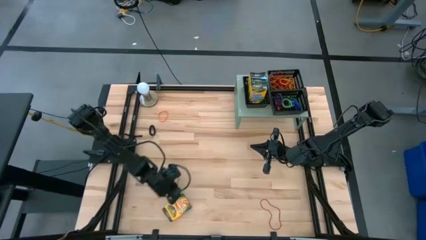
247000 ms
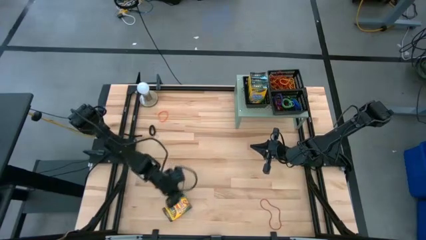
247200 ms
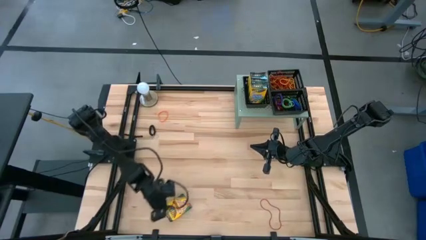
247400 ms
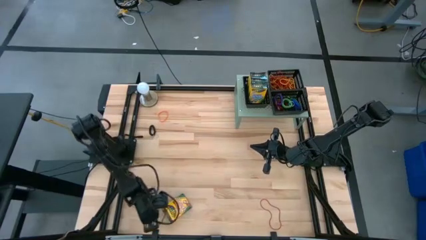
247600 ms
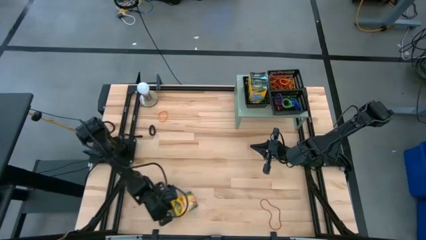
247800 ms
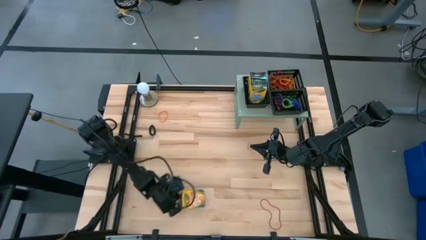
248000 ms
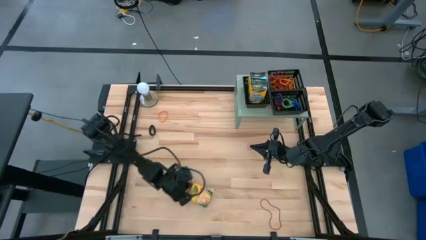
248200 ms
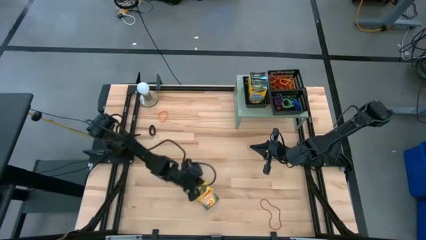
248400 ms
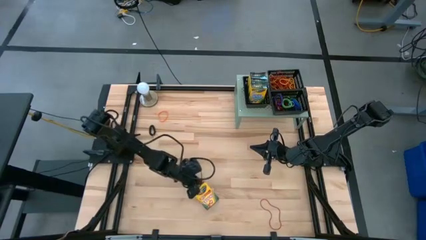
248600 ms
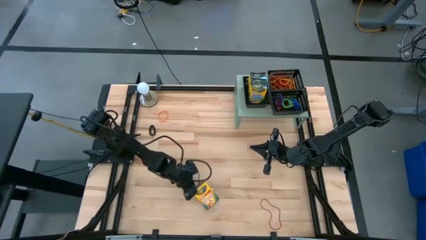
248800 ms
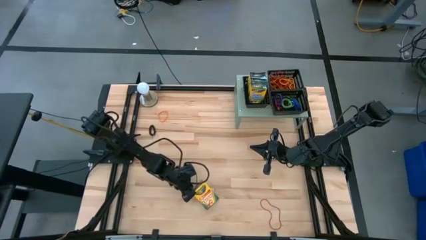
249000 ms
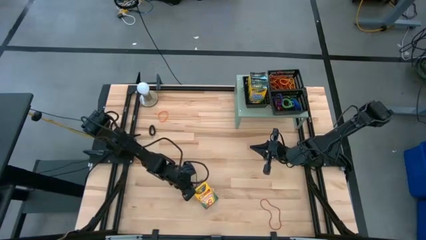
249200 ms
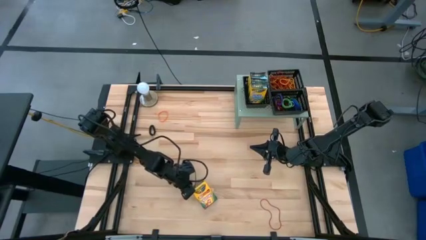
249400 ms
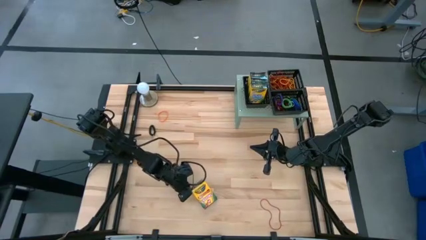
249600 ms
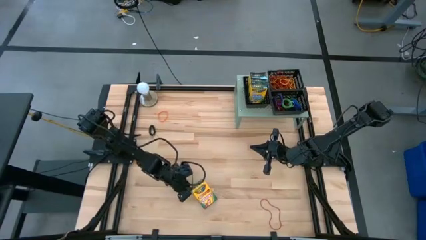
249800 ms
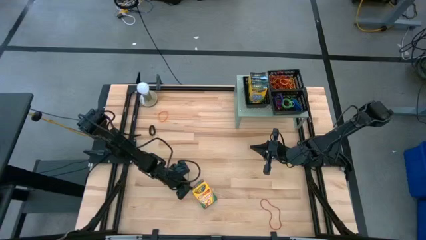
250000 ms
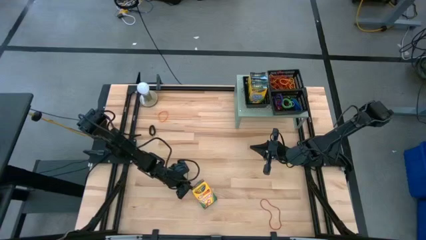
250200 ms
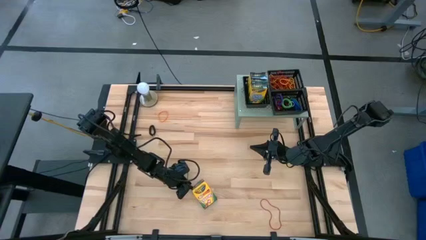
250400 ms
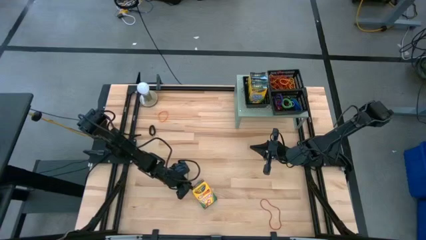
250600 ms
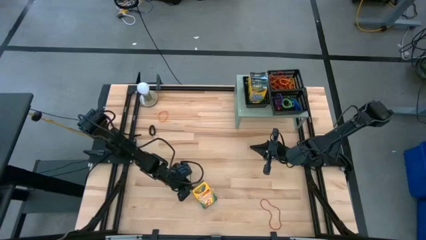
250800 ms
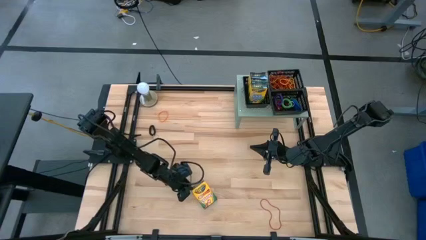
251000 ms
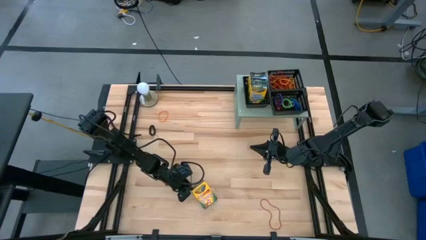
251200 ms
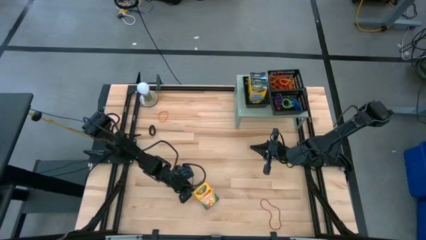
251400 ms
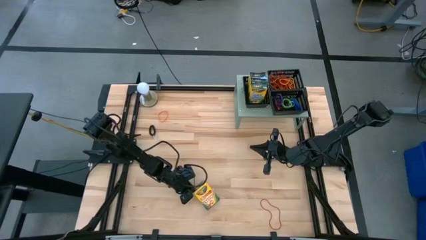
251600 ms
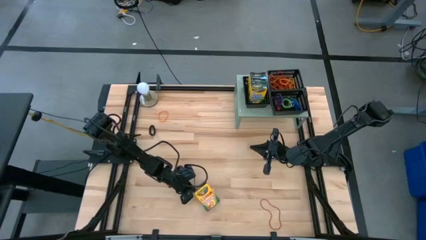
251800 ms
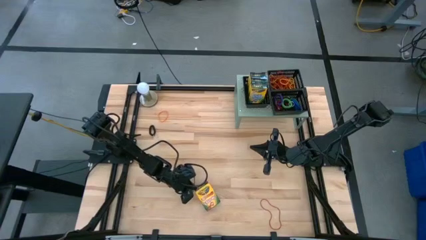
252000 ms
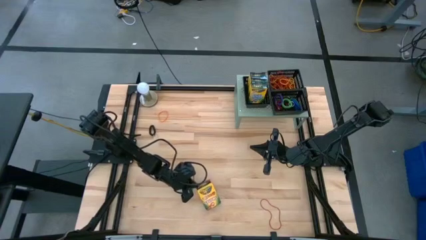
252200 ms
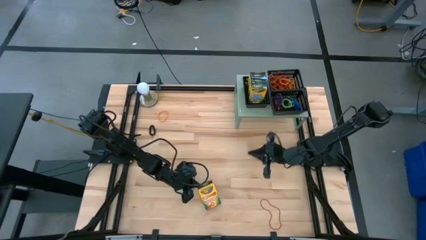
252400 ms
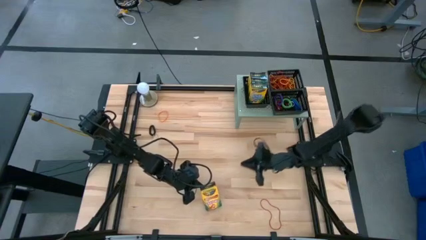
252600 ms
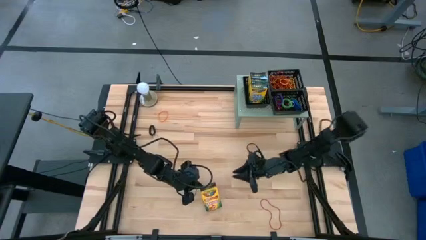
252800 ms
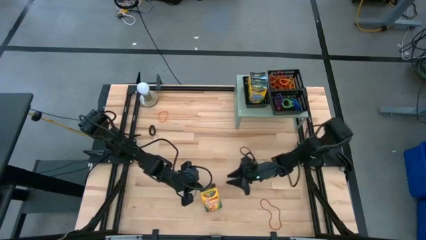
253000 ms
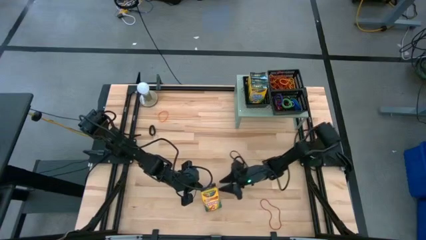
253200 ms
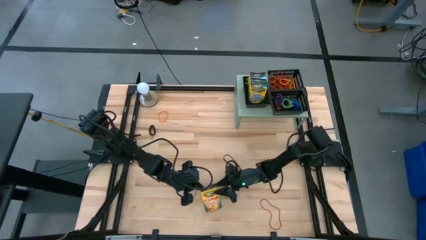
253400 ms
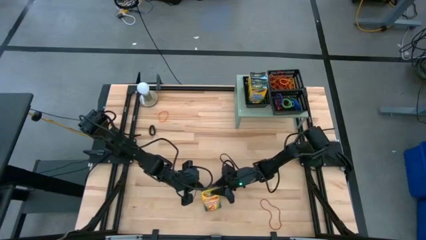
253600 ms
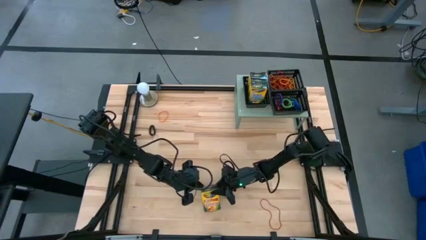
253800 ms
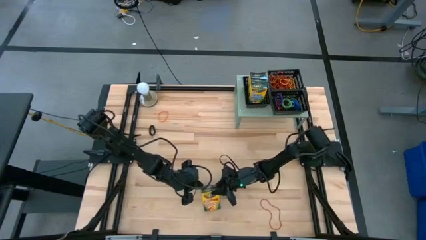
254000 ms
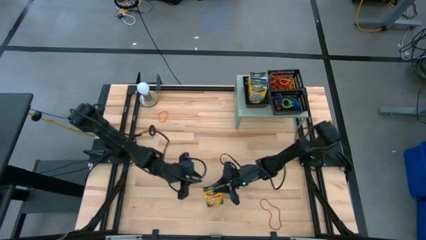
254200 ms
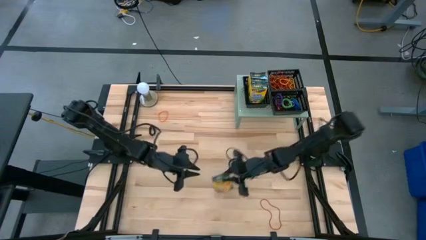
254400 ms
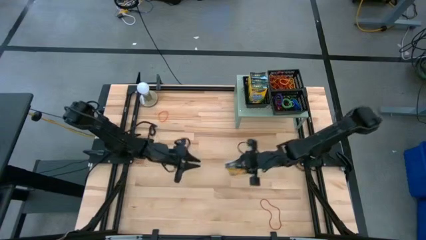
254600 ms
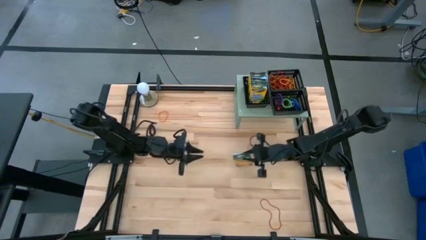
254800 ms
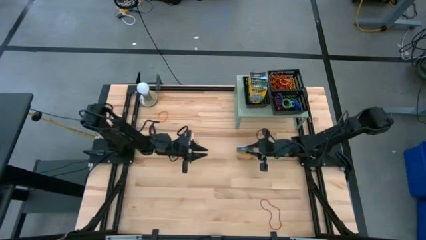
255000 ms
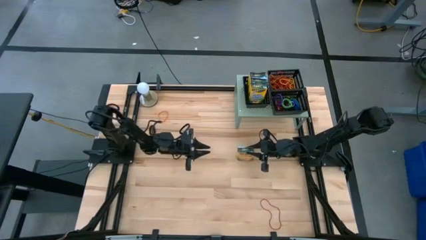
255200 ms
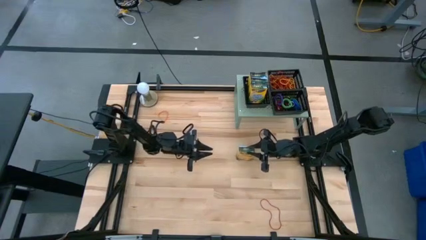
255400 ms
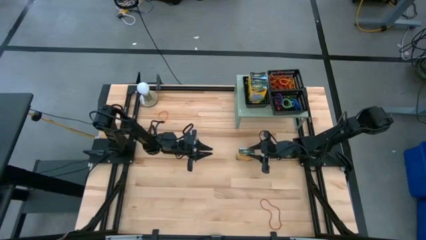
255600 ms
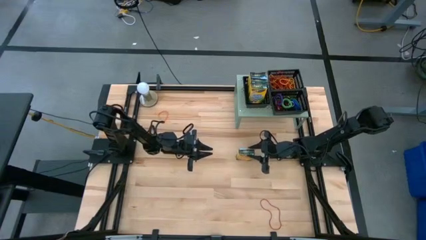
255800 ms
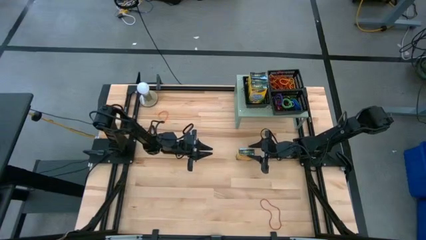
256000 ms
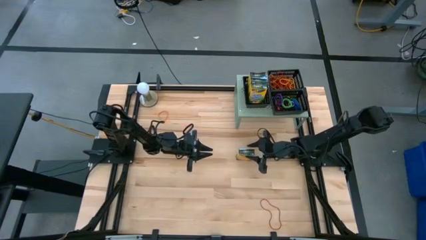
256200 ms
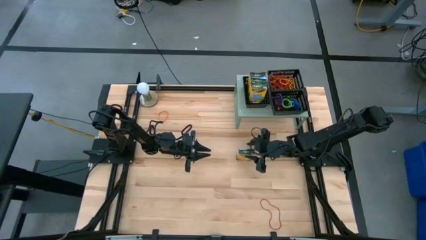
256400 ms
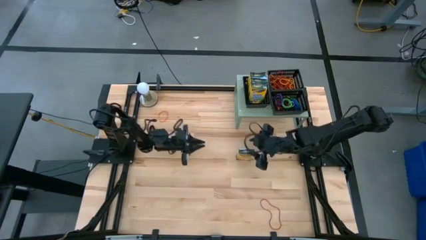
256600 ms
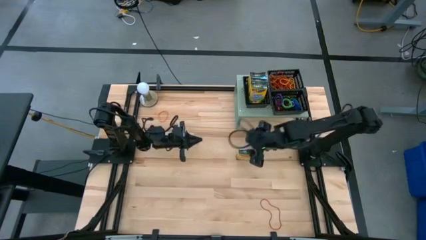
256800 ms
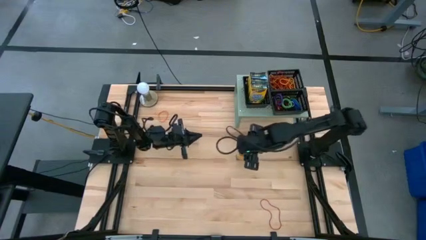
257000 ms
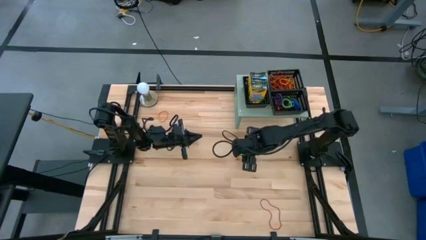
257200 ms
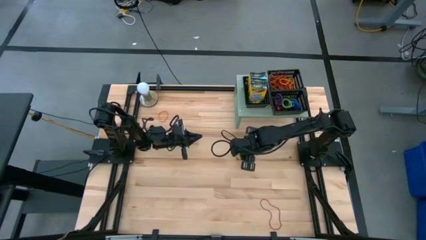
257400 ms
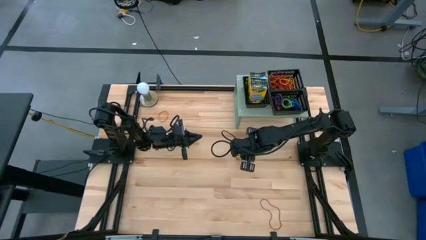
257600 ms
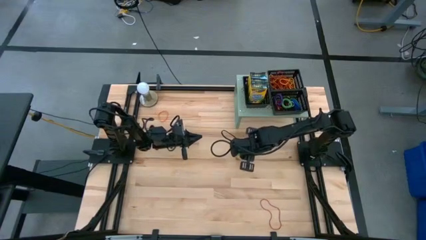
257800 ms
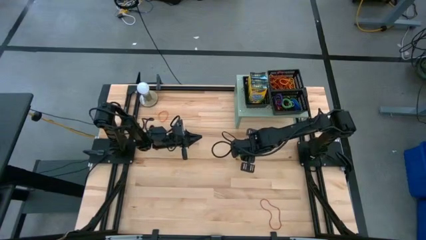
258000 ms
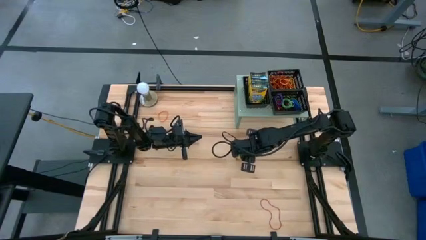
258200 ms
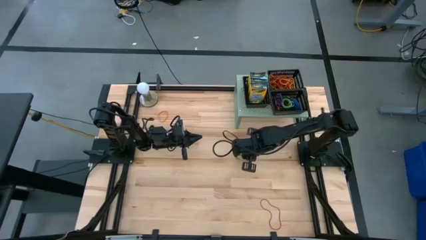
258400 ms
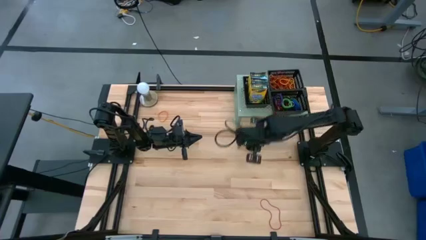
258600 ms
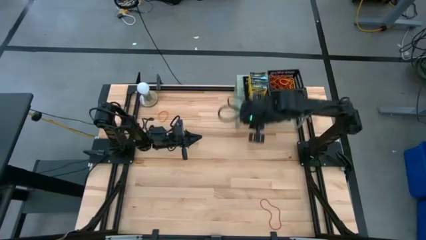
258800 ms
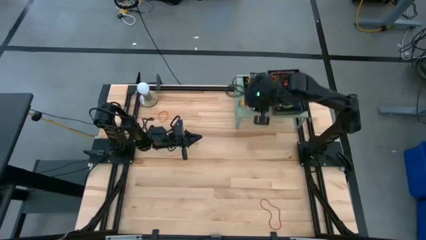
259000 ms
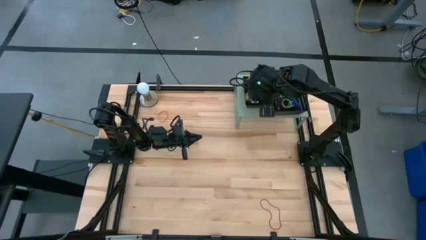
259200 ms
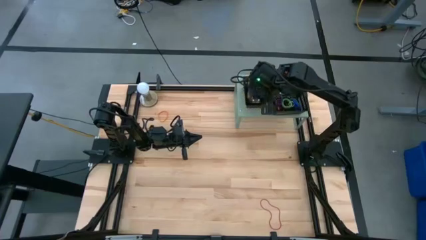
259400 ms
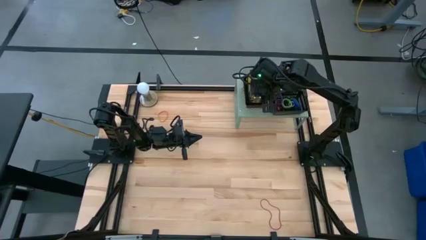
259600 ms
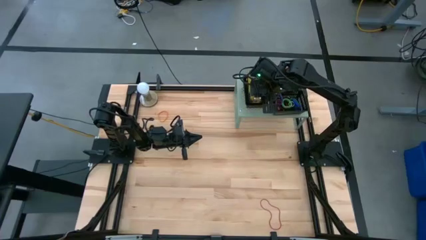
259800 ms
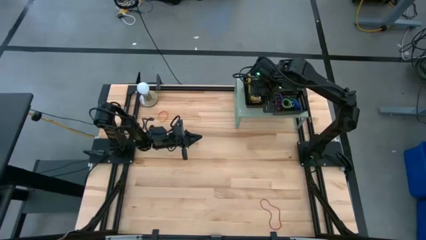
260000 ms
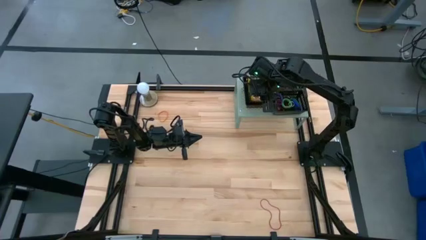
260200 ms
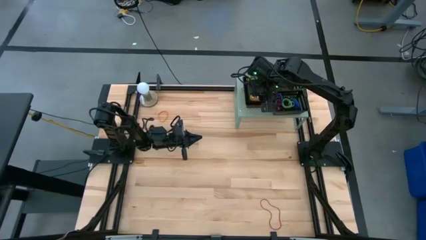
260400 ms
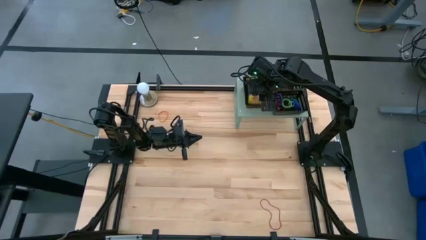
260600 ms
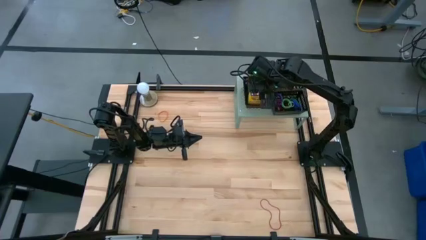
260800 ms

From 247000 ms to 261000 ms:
Task: Pick & Place Office Desk Supplies
Put the yellow crayon box into the left black bin on the shelf

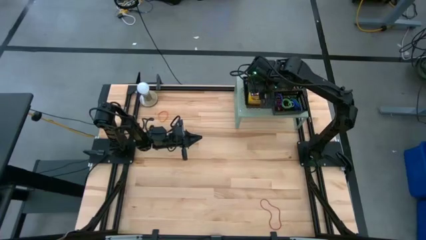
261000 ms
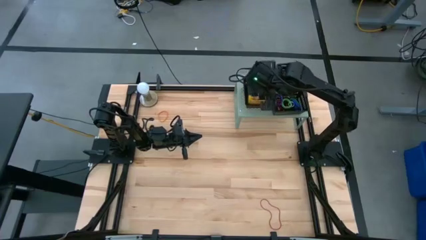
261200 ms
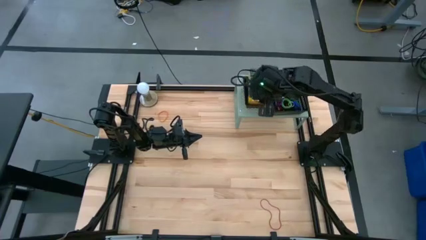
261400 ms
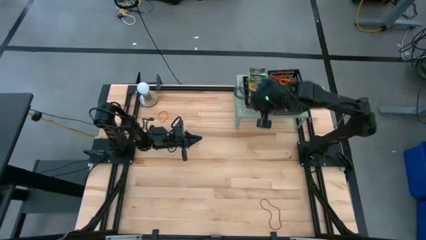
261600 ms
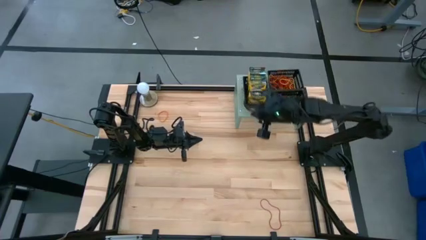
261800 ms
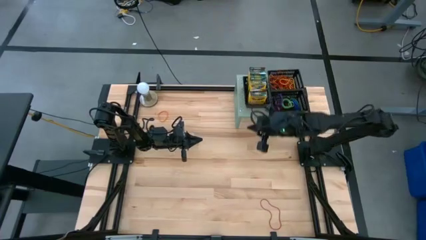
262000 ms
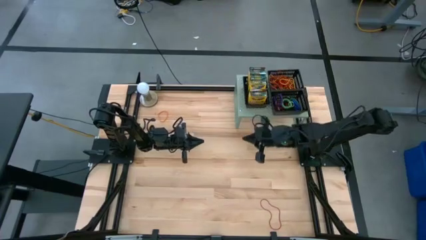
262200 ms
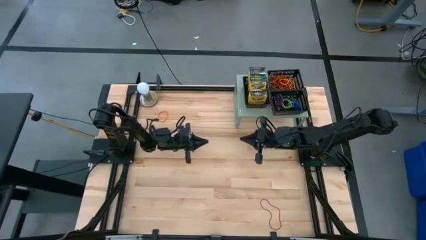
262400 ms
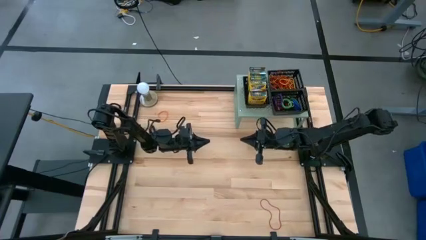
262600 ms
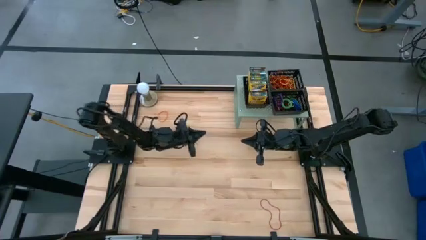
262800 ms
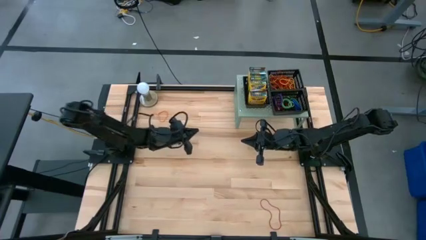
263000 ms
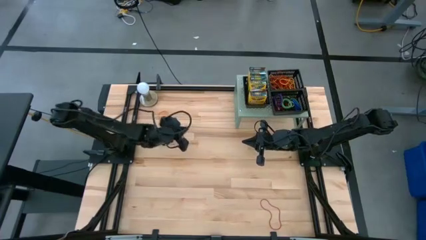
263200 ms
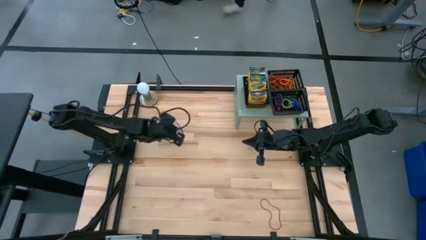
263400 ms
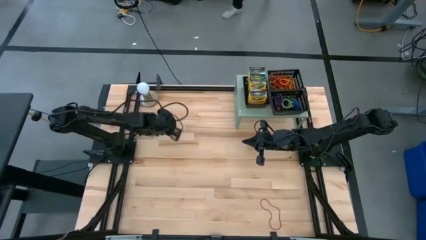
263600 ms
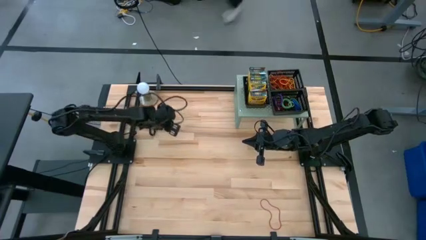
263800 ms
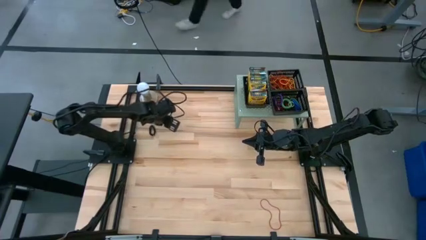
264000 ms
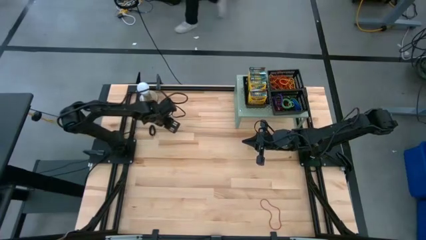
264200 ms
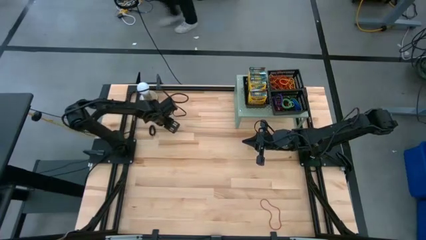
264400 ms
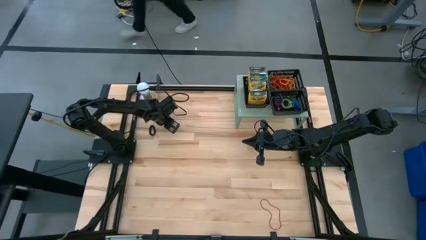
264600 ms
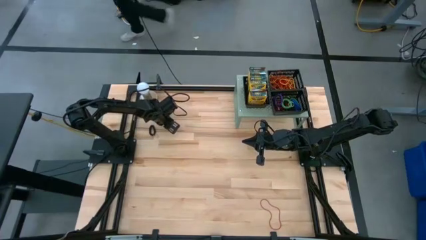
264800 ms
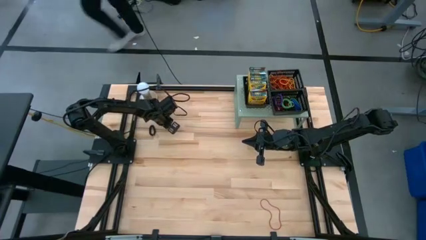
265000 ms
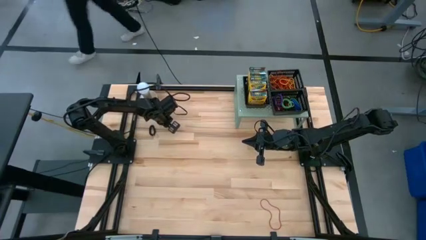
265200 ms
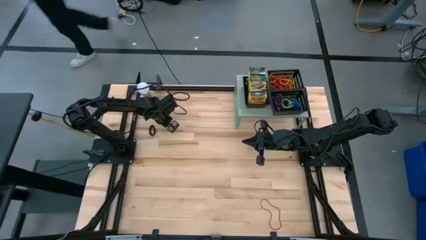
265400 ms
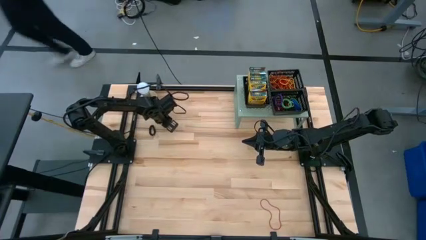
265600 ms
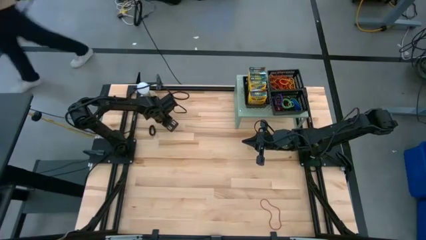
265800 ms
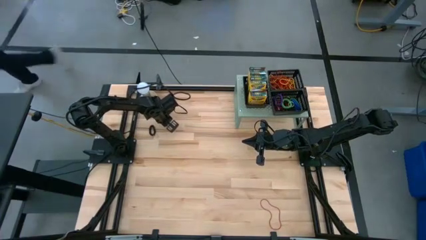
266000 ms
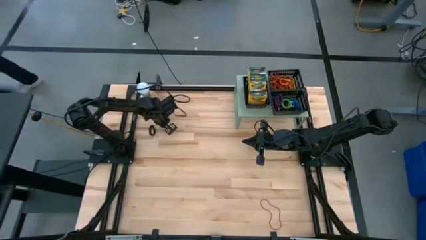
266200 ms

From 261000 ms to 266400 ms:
Put the orange rubber band into the top right black bin on the shelf
